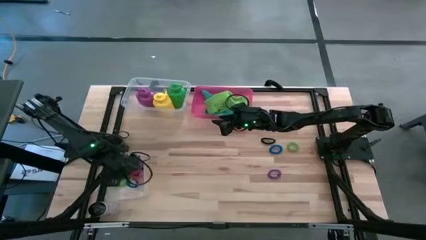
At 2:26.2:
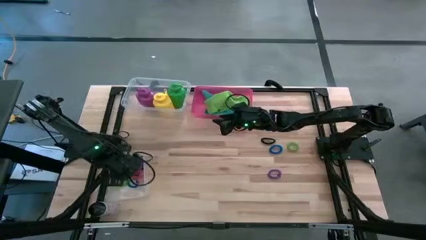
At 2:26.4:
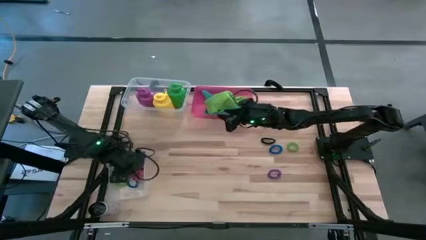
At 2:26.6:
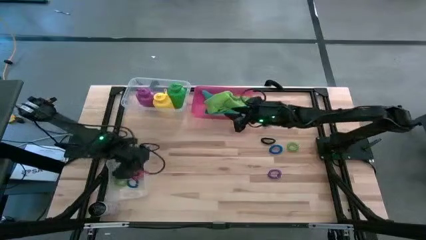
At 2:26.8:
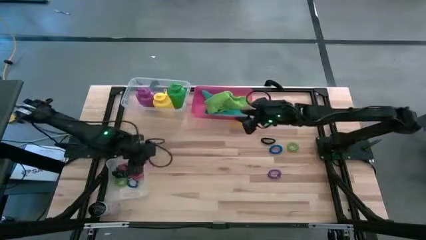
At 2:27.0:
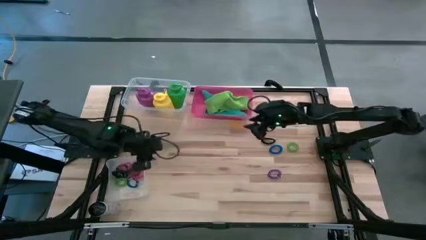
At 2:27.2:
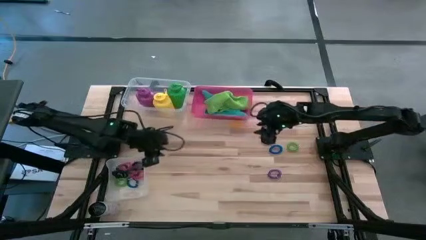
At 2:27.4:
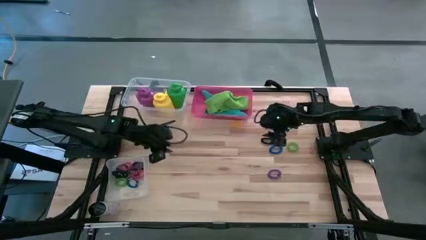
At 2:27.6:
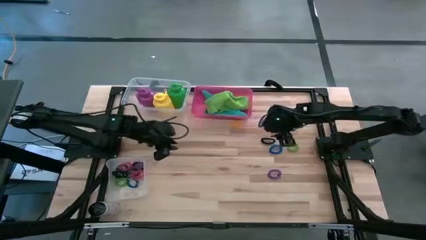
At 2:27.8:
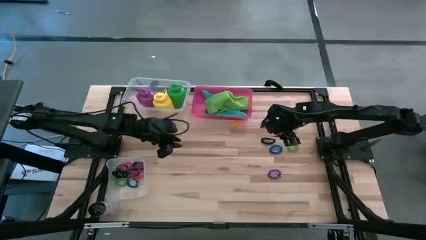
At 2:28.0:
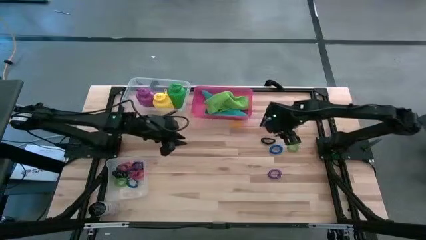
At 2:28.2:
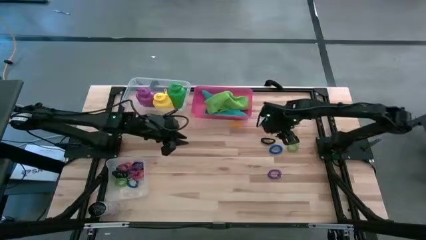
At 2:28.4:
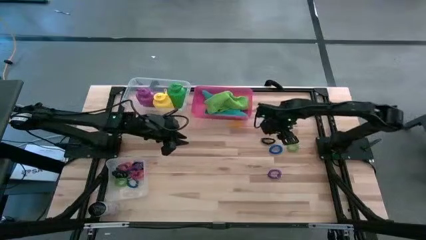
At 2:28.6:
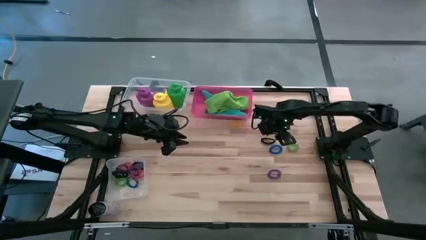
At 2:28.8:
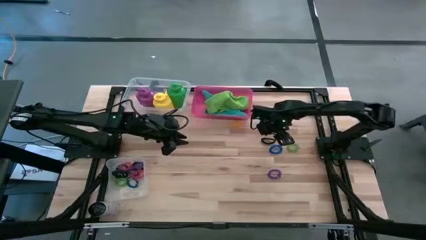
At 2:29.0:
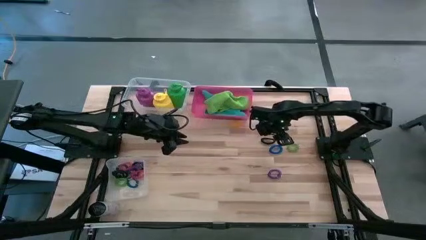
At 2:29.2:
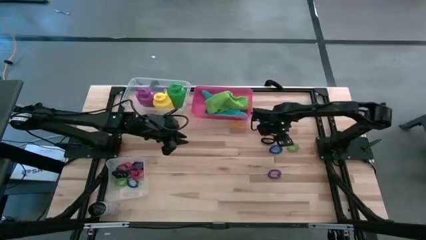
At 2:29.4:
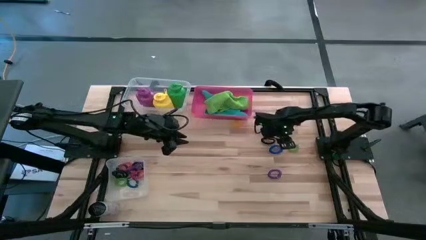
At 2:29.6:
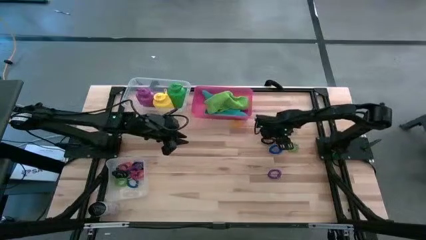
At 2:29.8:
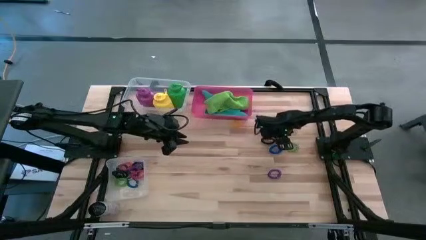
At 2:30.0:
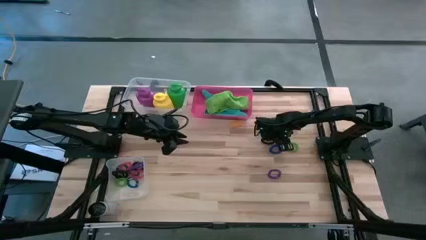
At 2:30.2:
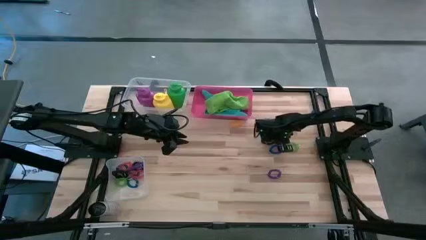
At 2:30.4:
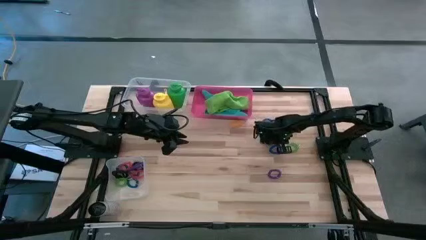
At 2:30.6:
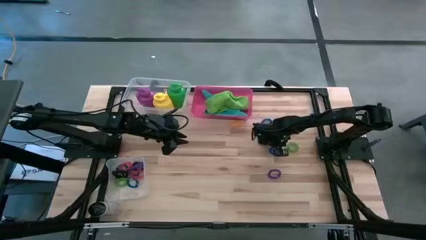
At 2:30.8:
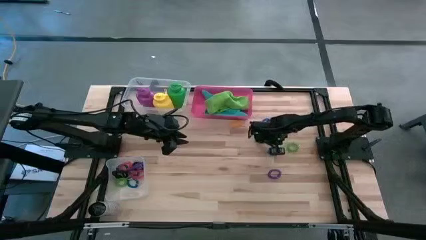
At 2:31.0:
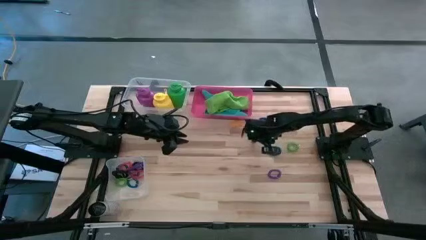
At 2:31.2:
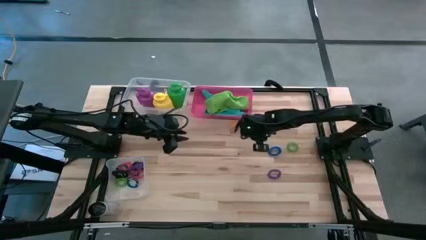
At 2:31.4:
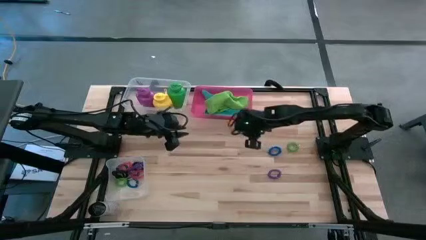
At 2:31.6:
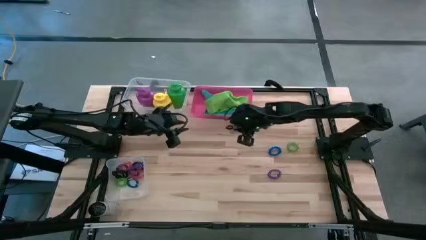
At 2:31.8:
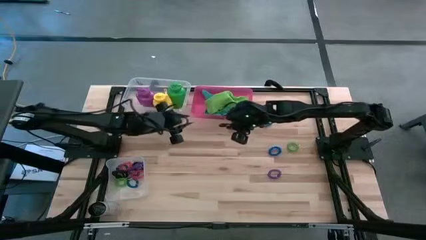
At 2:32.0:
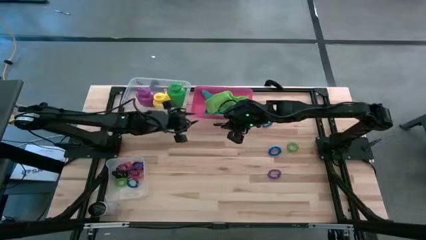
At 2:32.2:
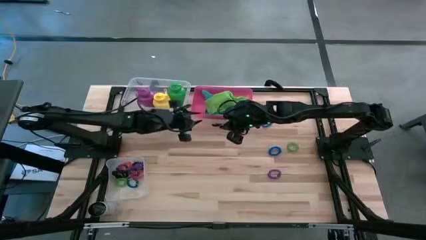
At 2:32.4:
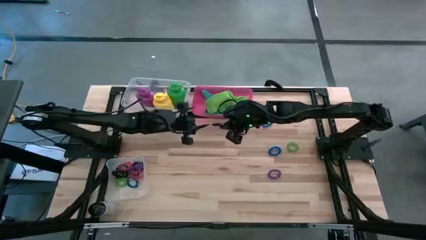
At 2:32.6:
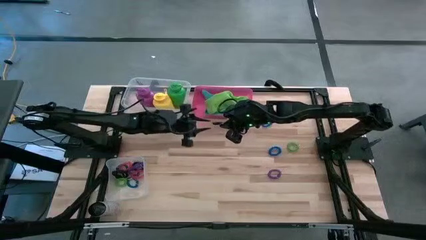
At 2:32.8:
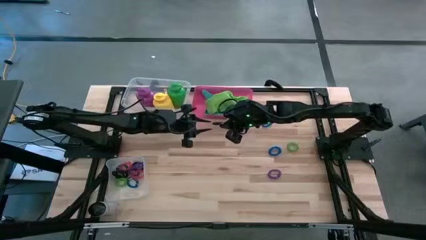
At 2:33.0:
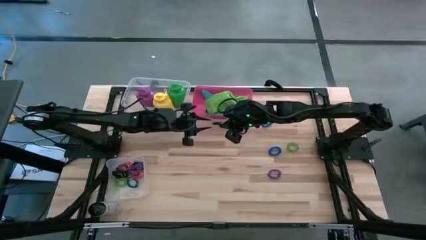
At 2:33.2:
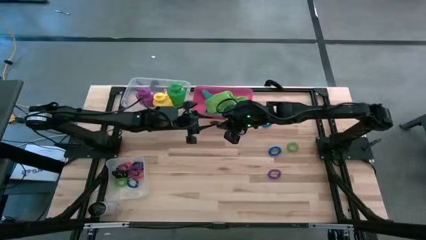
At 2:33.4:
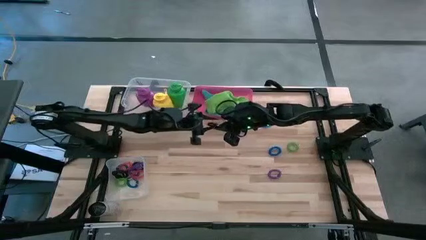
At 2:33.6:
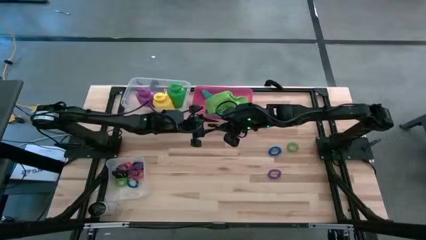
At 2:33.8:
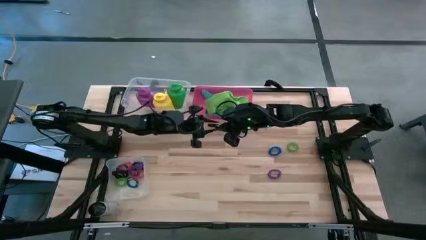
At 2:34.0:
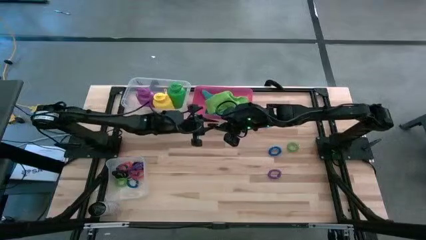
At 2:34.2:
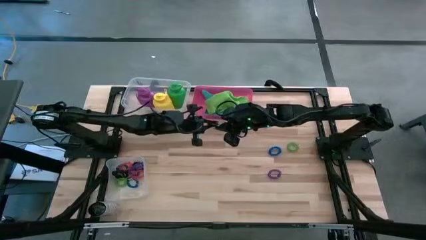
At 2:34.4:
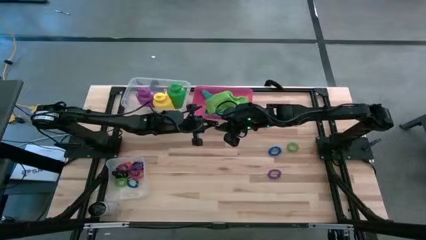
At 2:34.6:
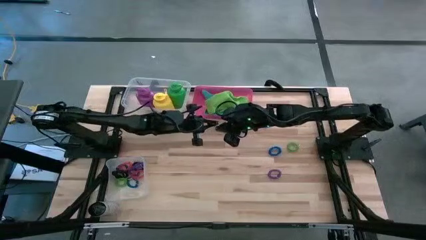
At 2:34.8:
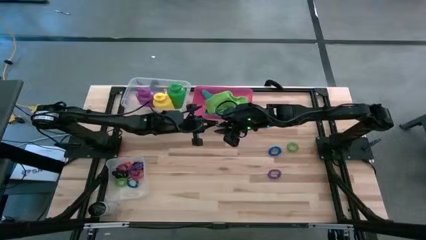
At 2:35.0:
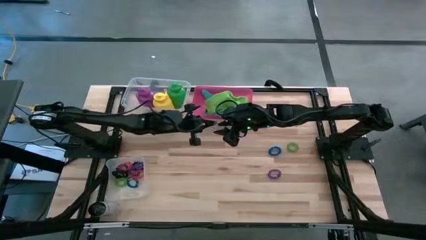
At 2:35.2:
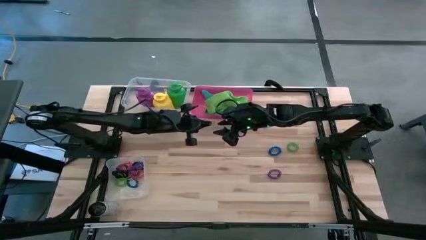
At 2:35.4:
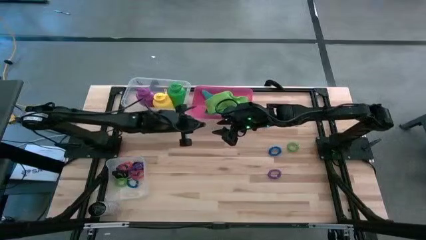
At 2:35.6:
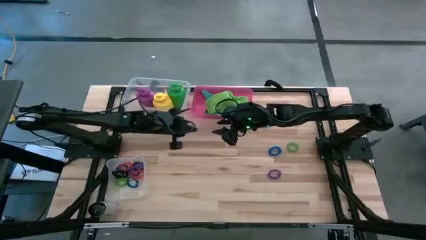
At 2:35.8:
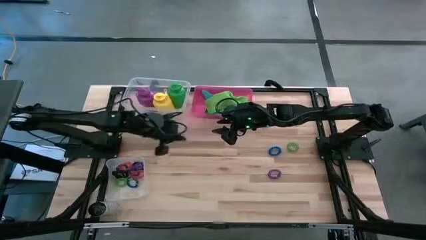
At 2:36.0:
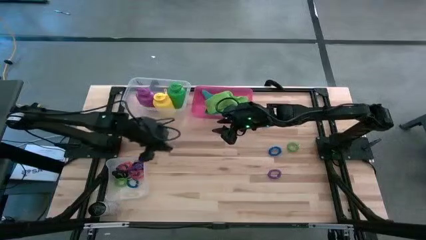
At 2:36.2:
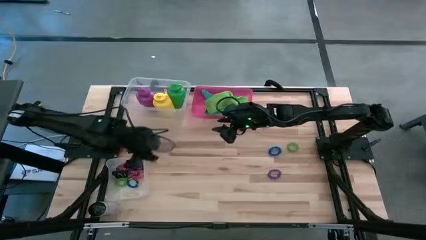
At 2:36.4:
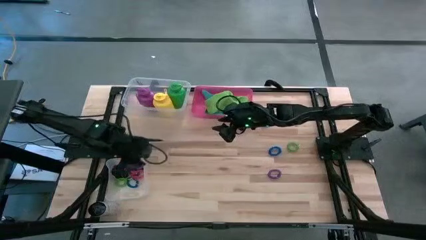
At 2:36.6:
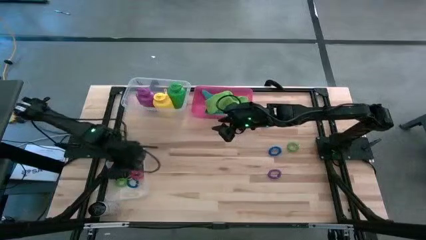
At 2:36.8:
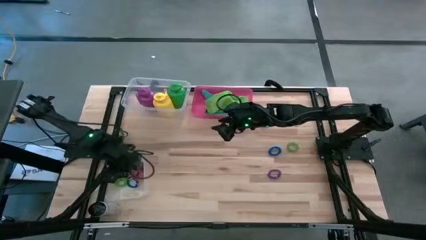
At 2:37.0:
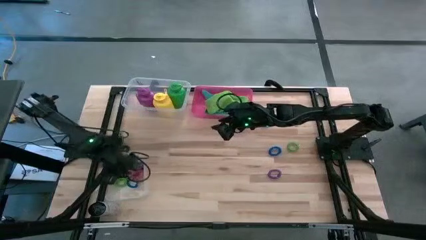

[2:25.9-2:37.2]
Task: Pick & Place Sports Items
Put the black spring keychain into the bottom transparent bin

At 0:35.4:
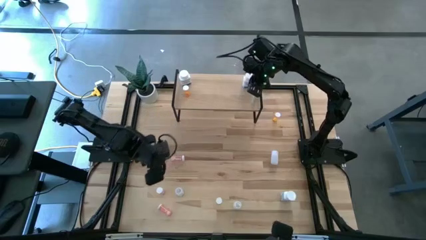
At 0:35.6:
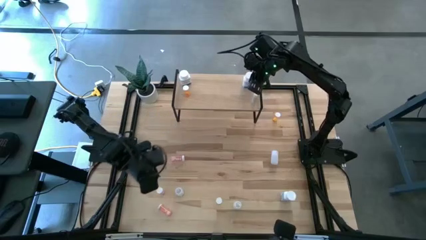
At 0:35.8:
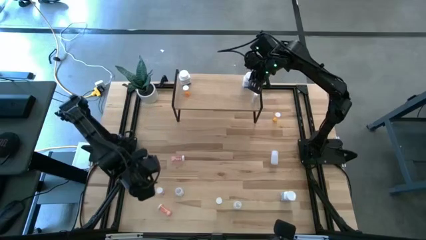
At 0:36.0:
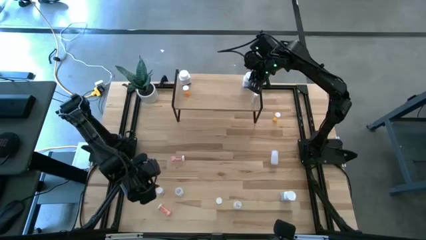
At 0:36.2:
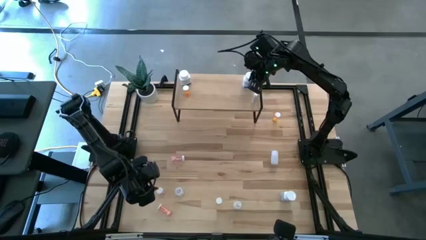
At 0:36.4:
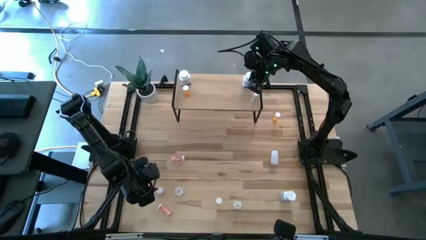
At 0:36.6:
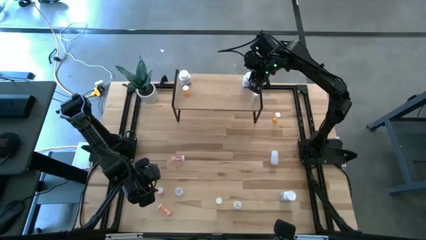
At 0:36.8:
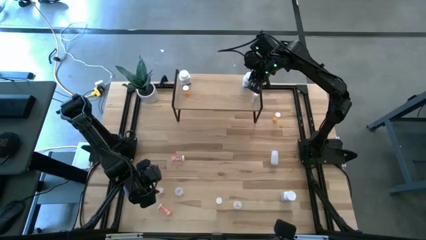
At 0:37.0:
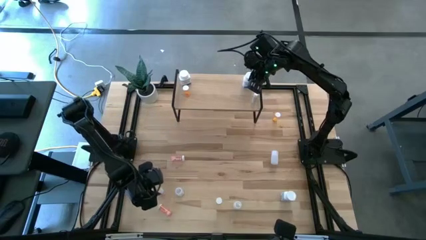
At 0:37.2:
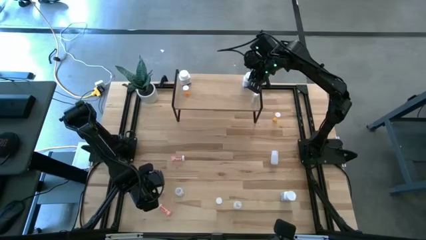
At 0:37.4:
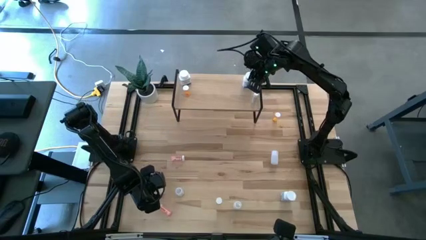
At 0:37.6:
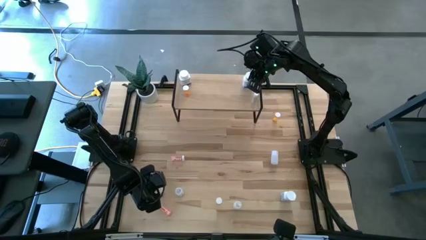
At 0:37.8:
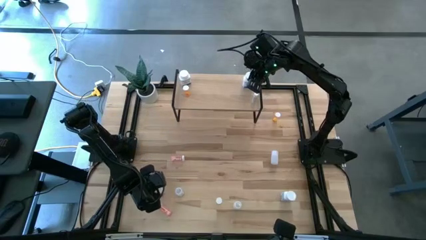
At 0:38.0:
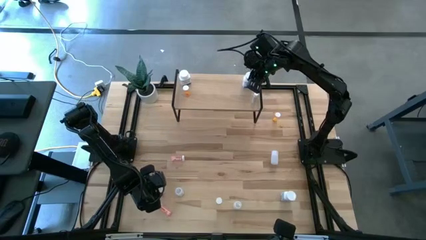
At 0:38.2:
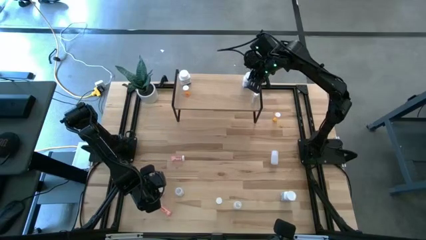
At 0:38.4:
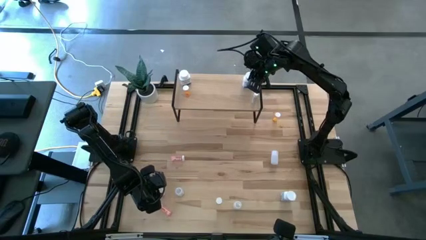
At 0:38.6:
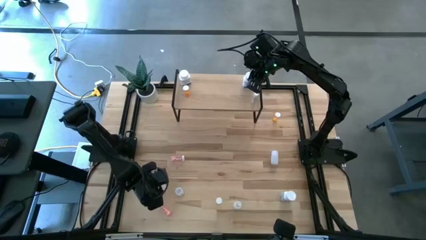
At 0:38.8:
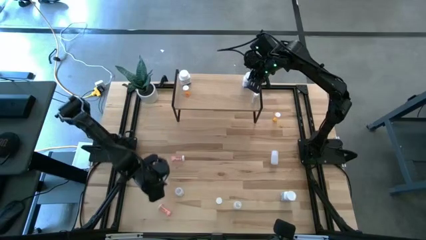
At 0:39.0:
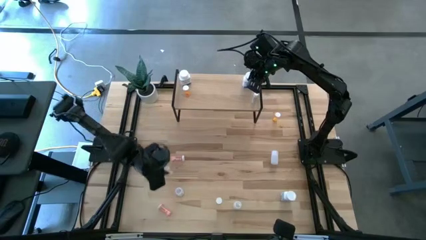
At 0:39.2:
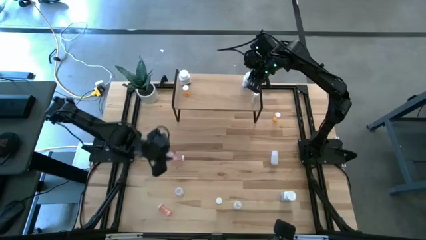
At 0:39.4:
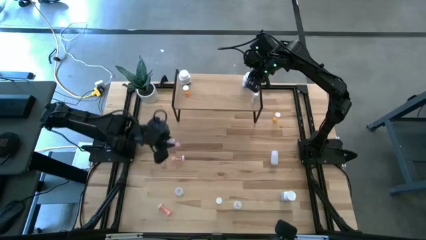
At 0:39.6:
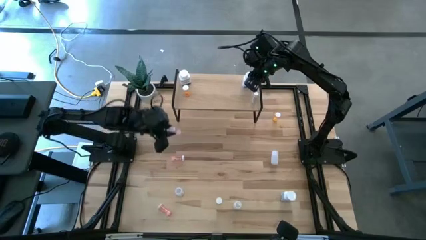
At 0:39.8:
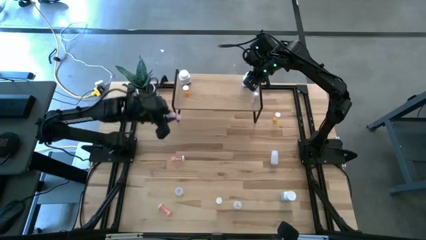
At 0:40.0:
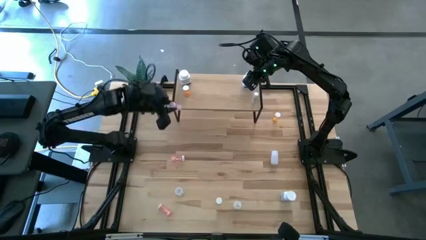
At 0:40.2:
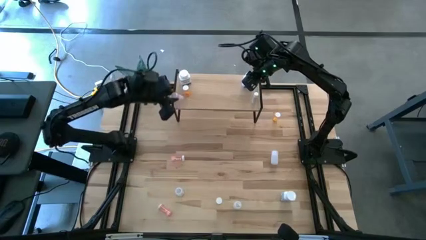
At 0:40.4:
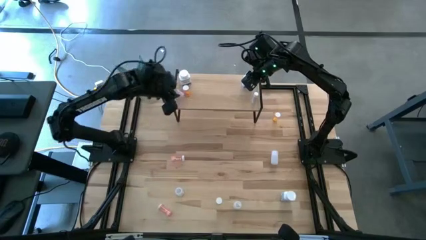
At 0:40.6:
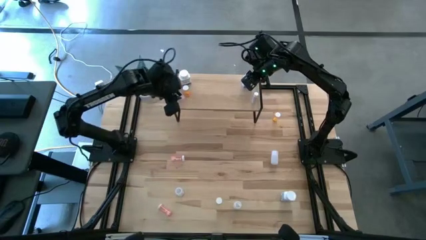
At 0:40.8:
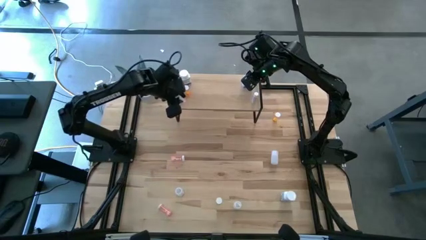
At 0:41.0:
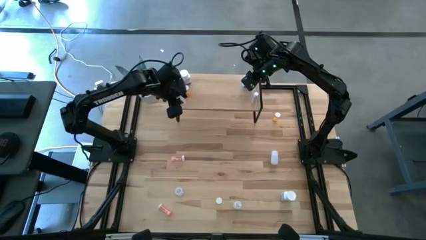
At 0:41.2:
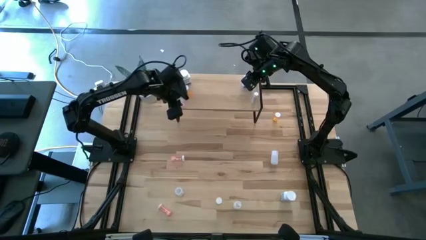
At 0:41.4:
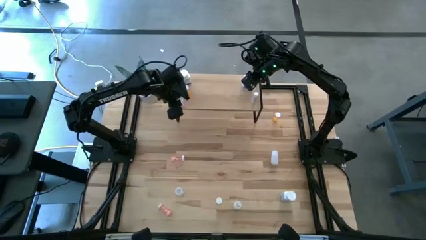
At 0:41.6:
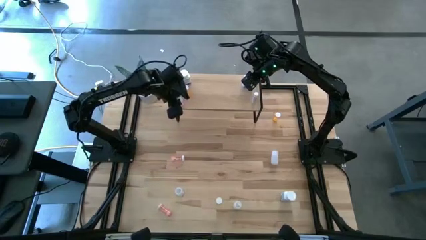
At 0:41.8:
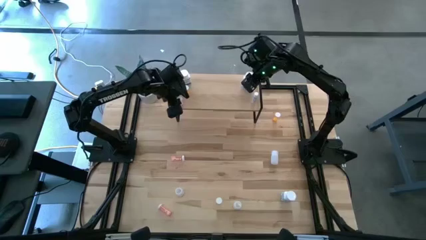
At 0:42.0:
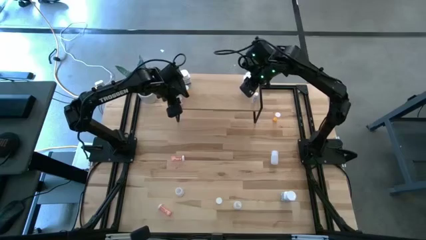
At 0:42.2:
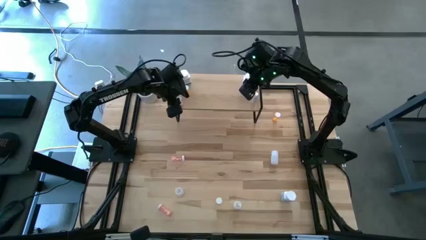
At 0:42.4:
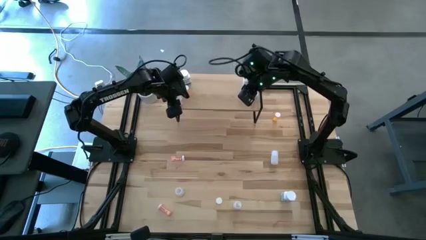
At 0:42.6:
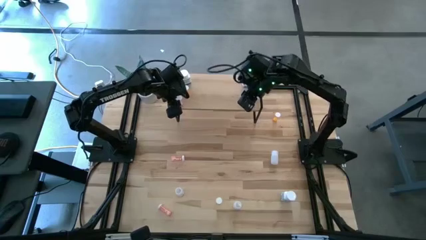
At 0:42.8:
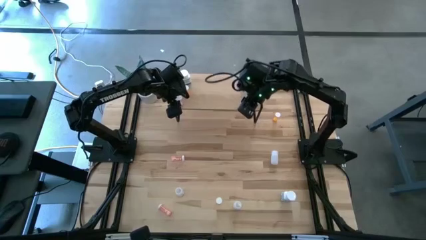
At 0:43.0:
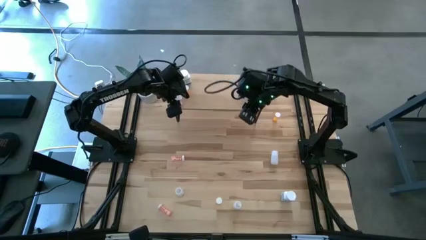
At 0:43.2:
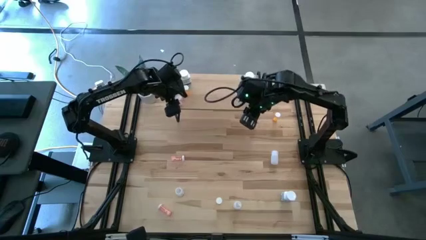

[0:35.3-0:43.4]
Task: Pick and place medicine bottles onto shelf by color
Put the center pink transparent pill bottle on the shelf
